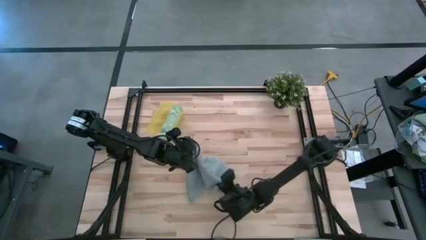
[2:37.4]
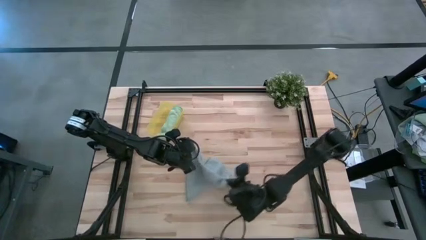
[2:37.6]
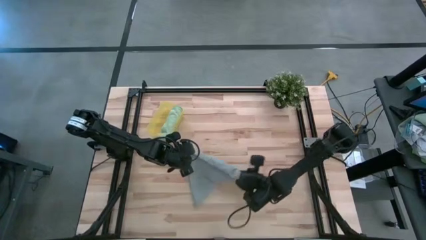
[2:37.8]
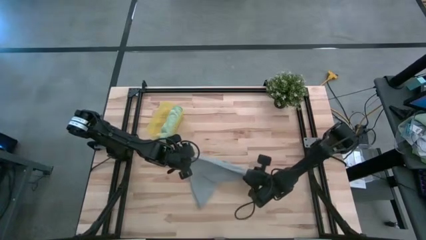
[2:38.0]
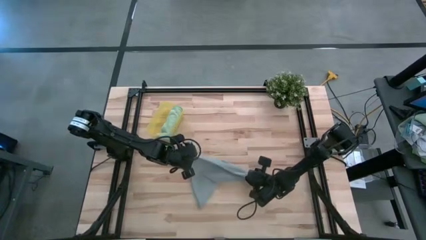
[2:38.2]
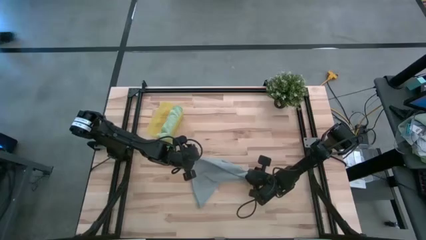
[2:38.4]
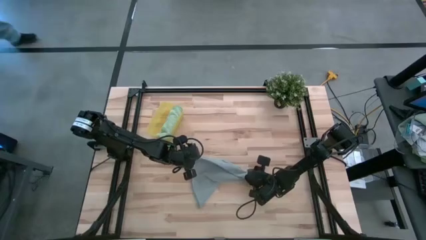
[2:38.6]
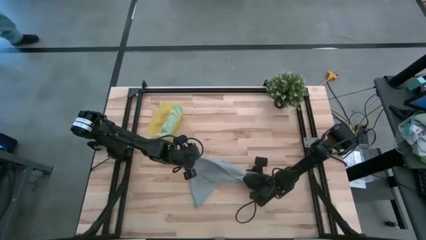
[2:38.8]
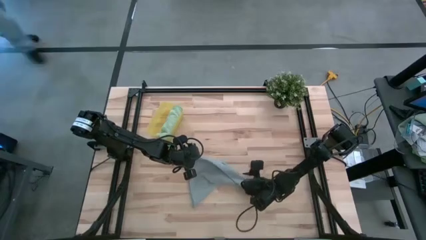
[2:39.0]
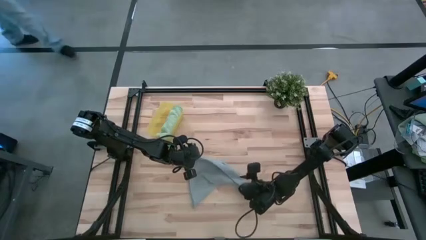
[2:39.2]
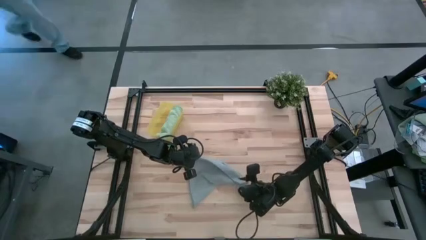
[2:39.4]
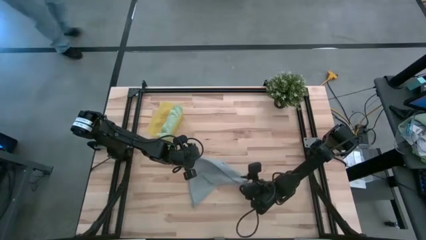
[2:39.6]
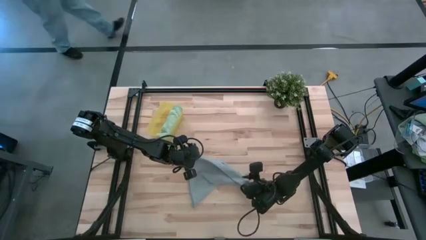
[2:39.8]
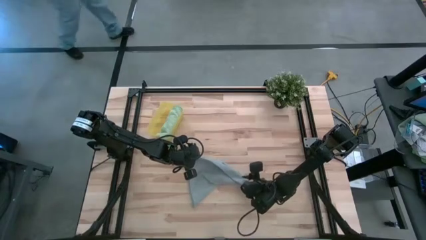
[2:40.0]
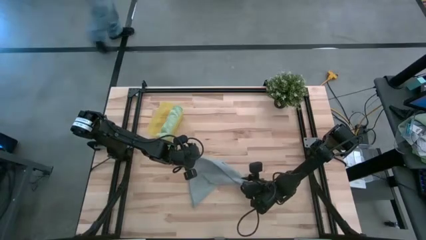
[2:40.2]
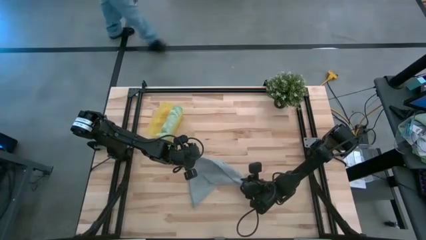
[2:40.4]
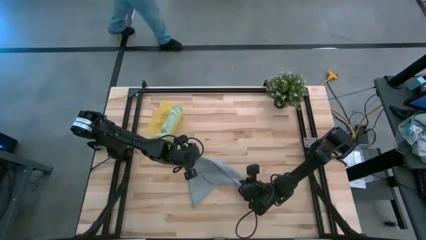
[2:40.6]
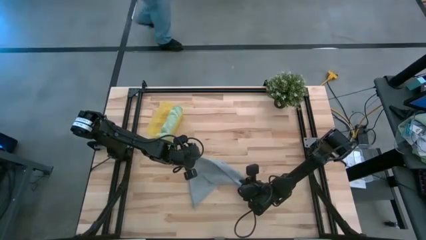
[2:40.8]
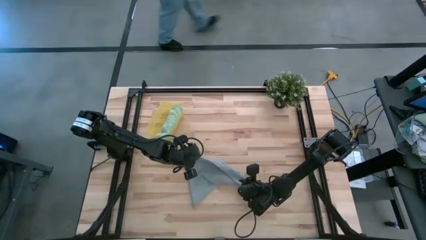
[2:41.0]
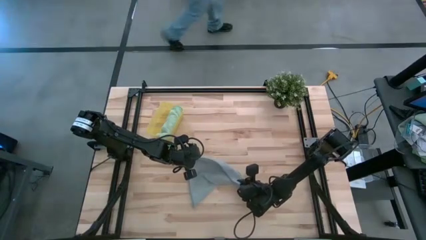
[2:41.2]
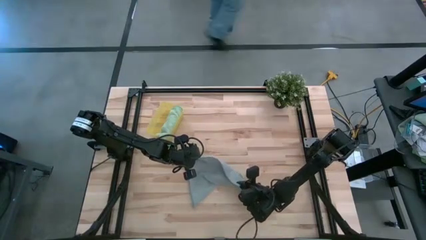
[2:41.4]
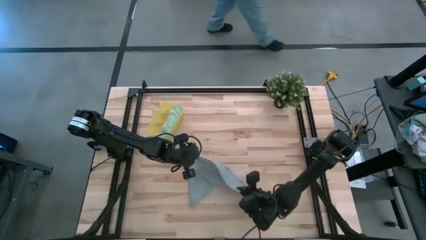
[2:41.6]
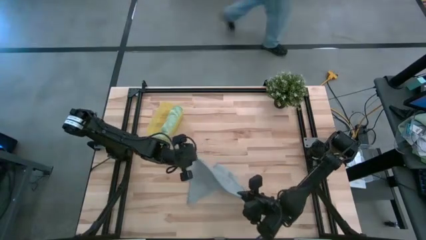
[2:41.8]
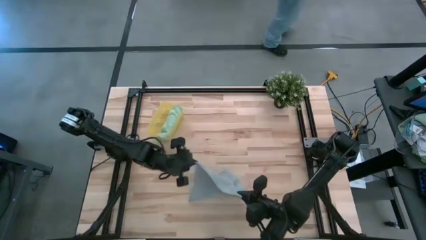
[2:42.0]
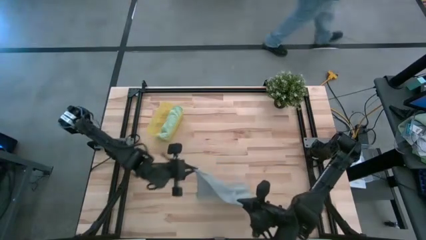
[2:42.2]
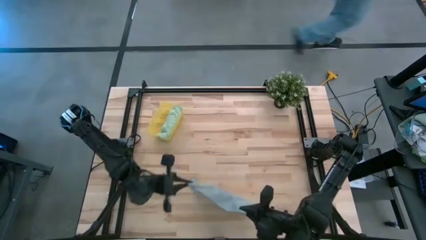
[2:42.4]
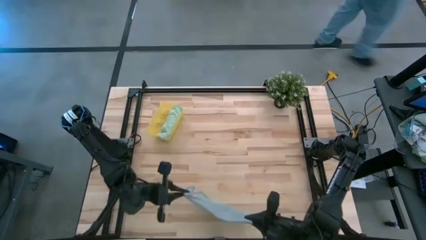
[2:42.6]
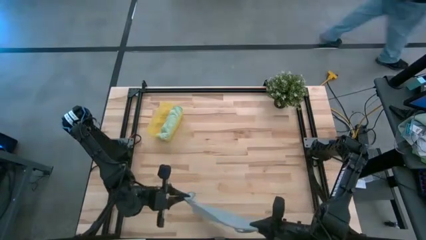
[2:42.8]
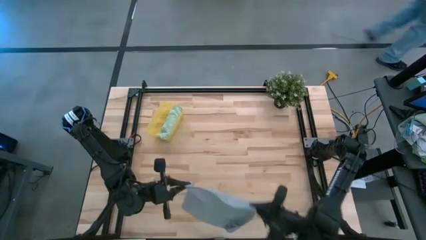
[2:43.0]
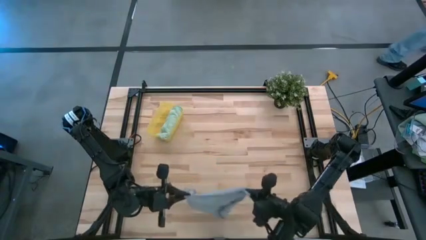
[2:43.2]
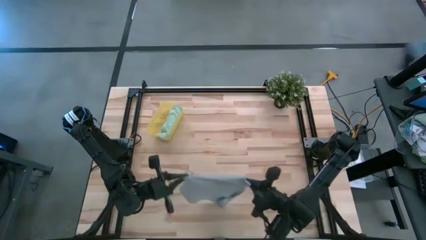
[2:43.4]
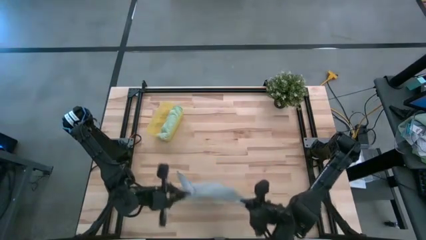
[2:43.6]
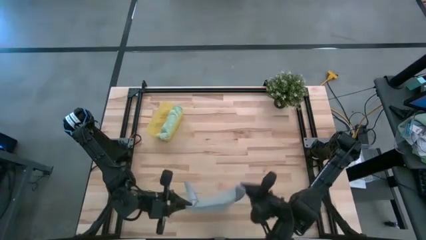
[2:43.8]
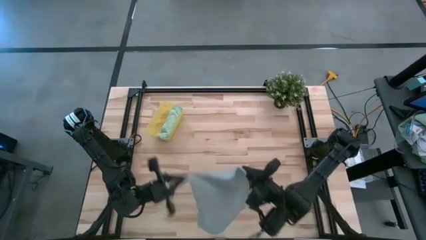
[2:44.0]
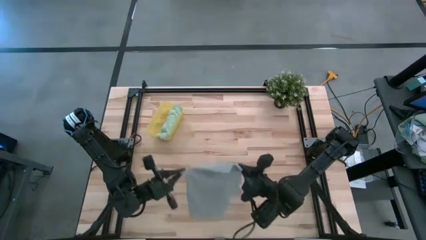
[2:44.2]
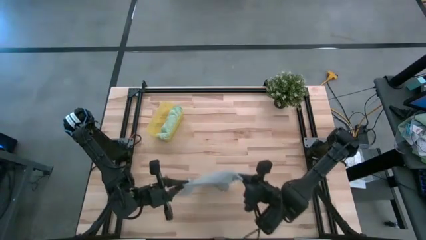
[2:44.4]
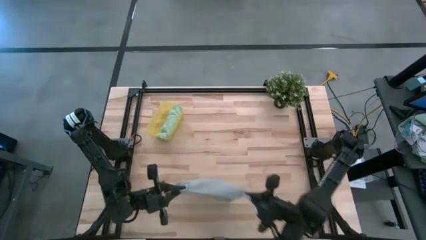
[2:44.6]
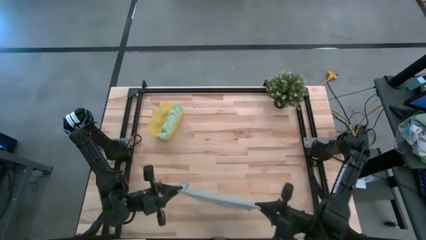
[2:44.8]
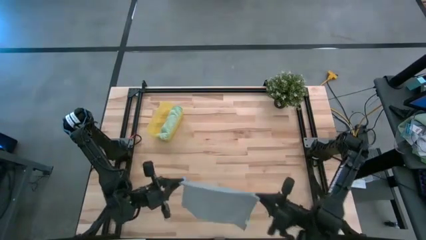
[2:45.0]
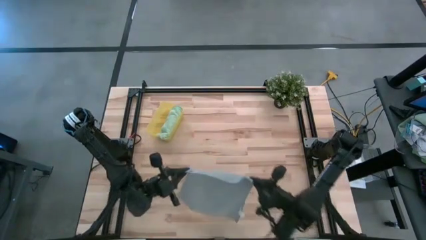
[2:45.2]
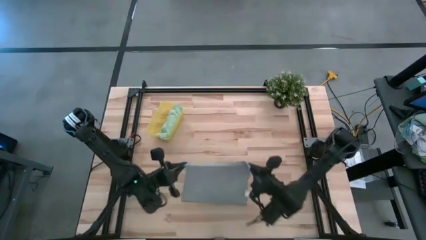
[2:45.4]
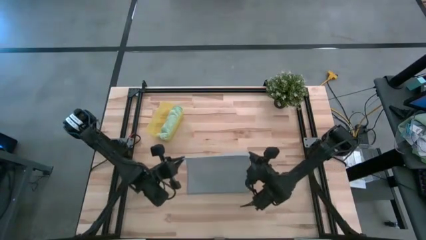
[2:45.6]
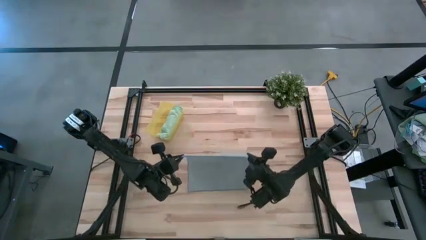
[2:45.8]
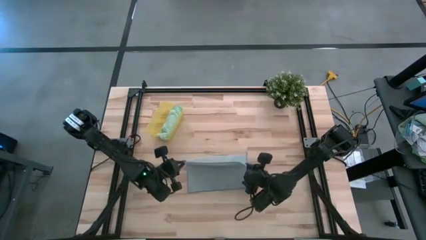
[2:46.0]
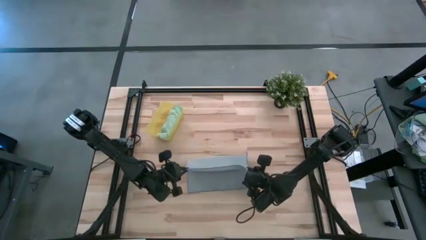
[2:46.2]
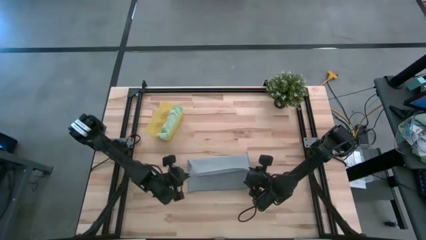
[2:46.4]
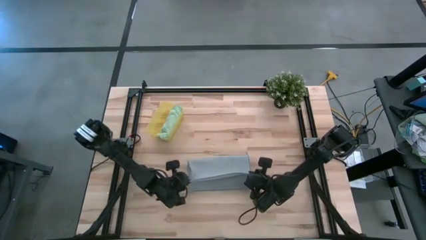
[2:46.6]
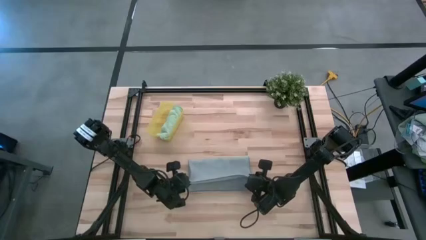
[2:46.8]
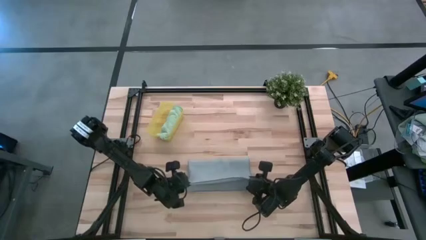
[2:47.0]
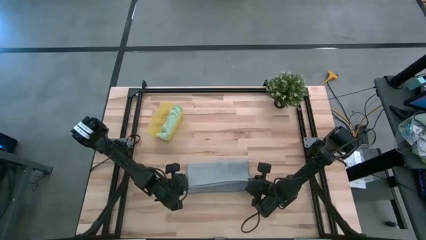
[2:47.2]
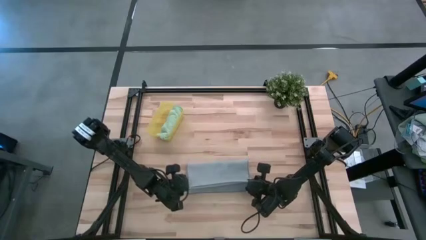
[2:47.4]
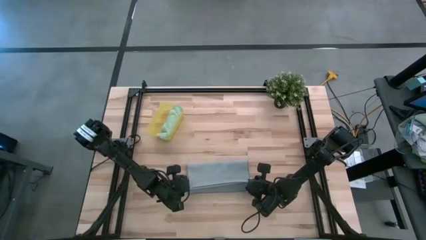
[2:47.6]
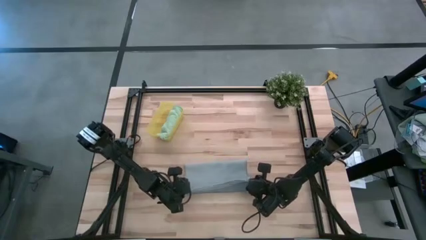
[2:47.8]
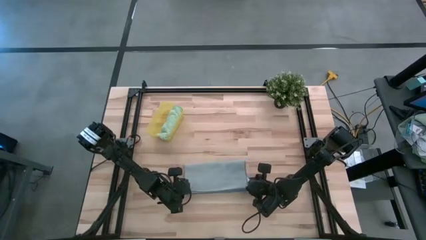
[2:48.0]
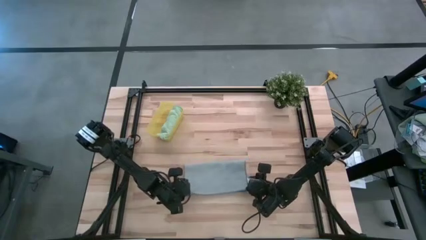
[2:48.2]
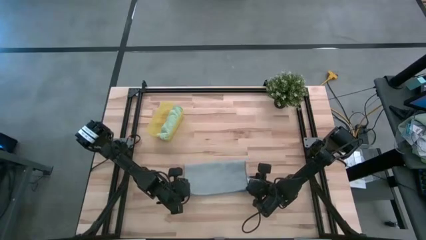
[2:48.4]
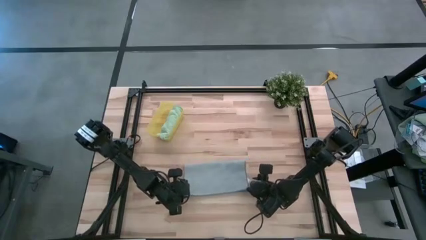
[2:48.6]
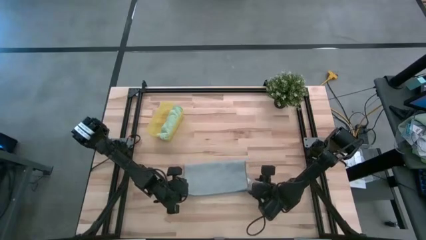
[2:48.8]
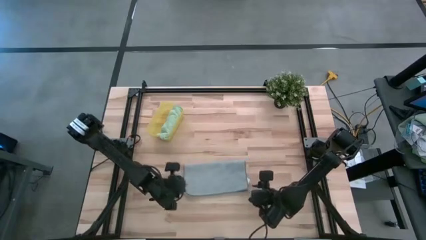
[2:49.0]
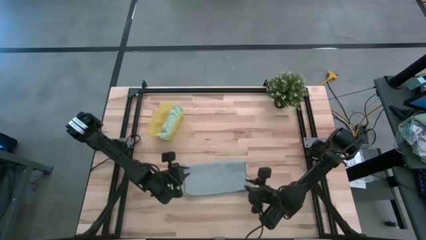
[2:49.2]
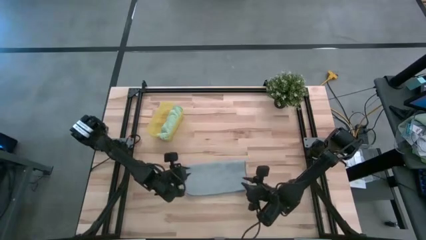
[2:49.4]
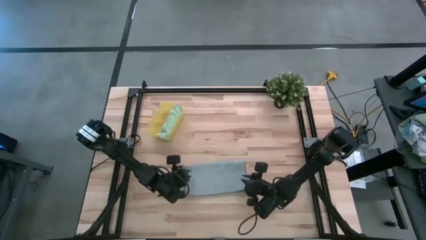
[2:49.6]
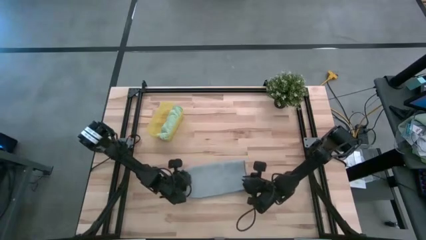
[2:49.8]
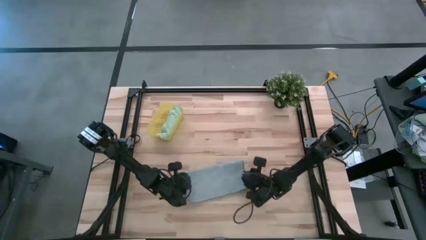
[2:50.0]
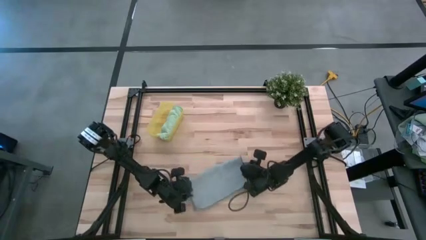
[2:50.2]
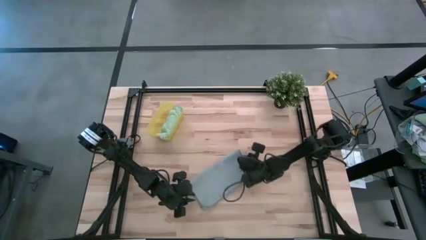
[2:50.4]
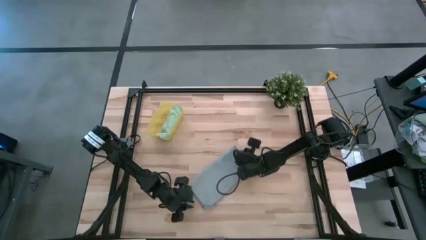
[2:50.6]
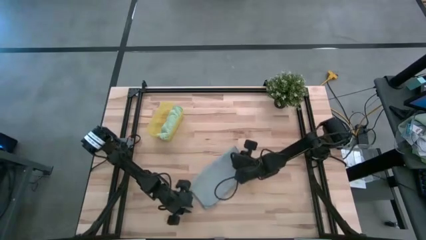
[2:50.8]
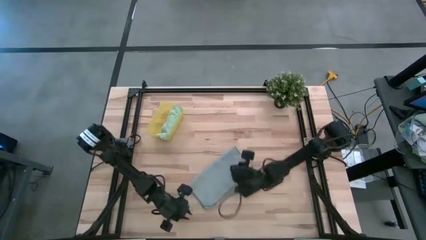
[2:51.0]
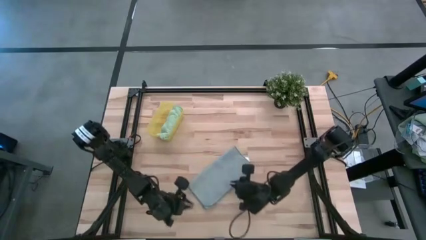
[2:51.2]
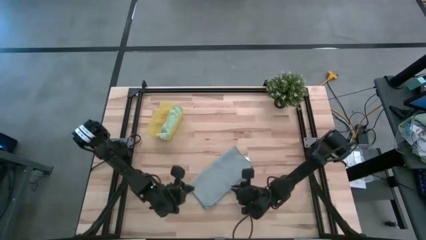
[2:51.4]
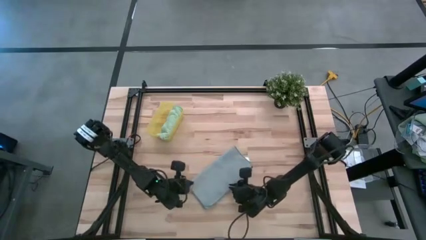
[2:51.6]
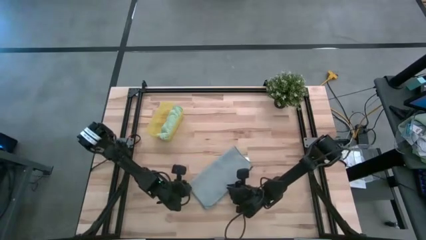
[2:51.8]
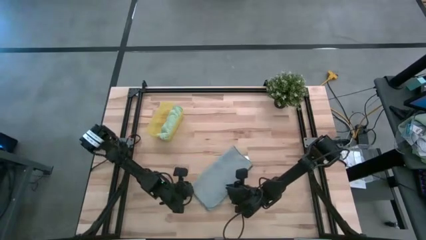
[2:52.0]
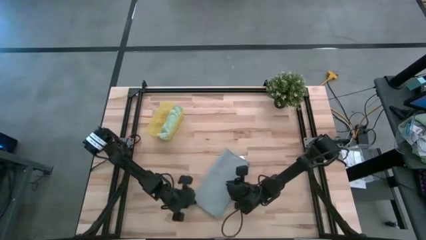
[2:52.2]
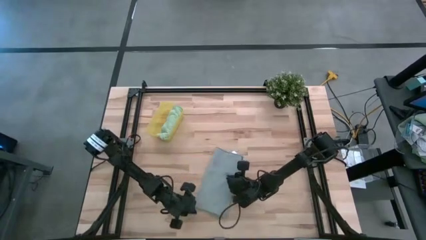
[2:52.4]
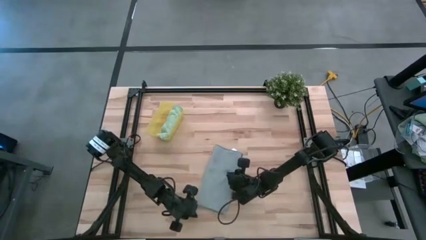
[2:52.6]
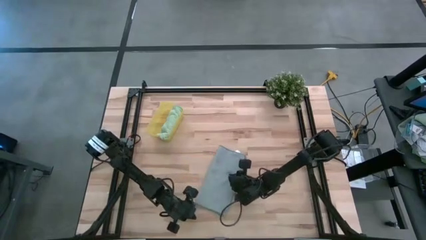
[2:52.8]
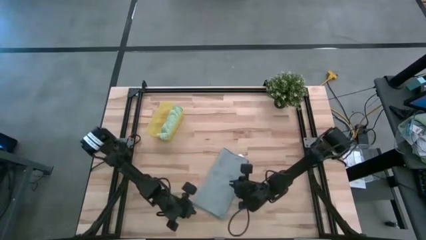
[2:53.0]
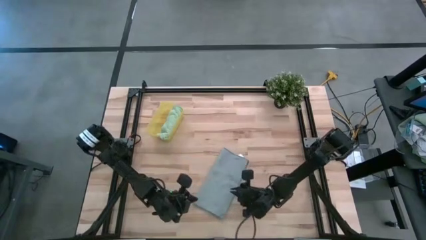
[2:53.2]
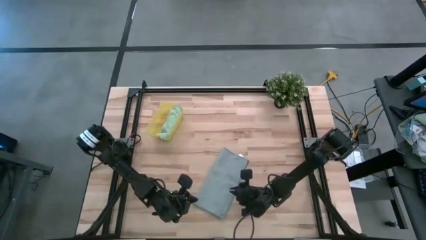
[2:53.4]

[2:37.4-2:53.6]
Task: Roll microfiber towels into tight, uniform cylinder then place into a basket
Fold the gray towel
